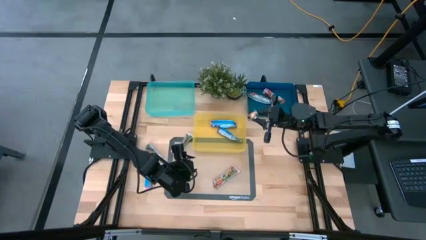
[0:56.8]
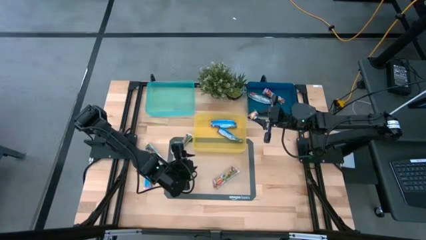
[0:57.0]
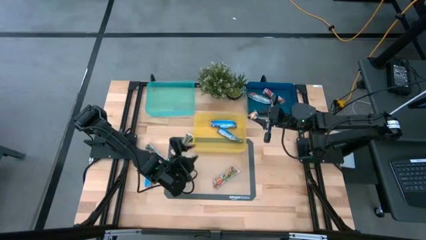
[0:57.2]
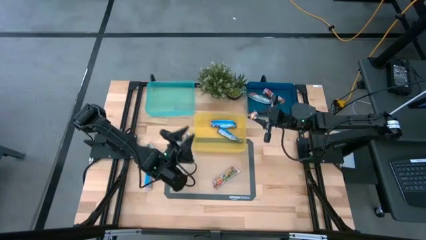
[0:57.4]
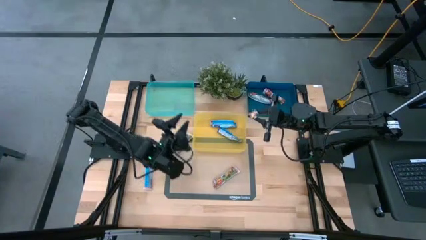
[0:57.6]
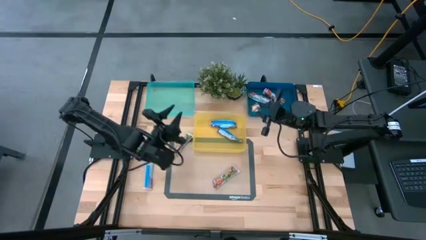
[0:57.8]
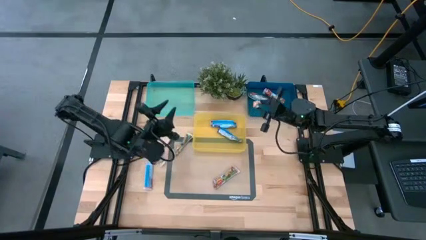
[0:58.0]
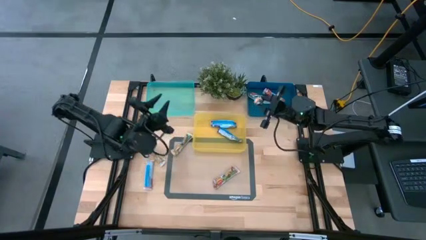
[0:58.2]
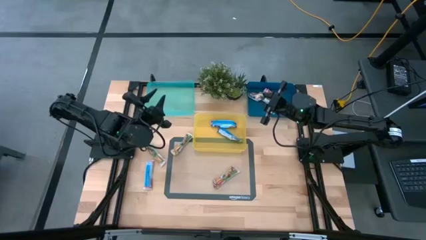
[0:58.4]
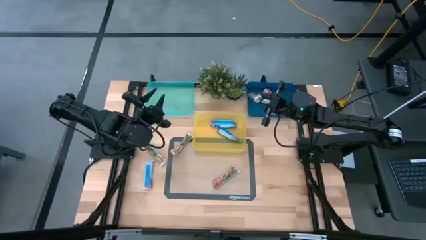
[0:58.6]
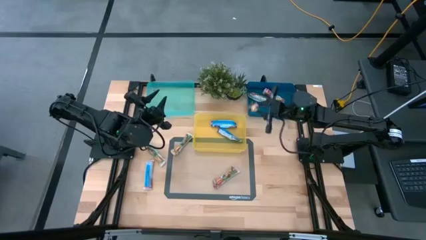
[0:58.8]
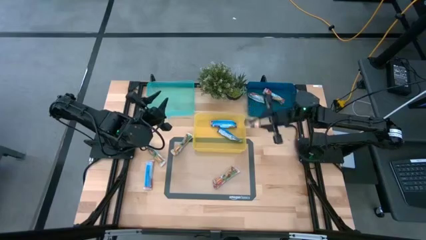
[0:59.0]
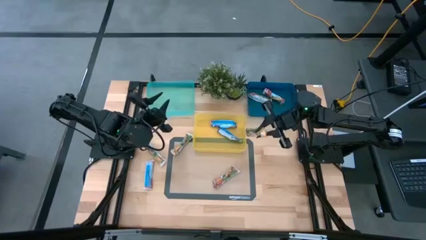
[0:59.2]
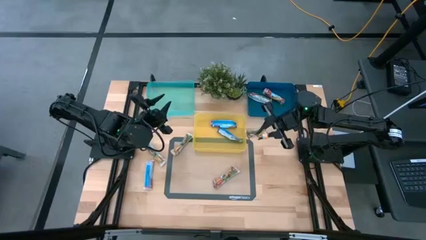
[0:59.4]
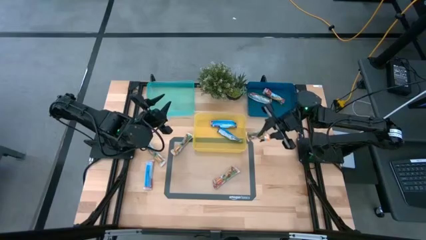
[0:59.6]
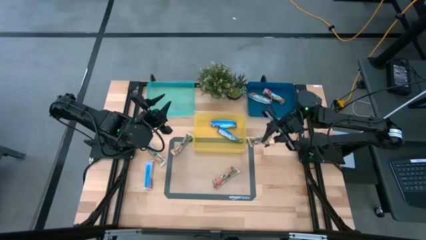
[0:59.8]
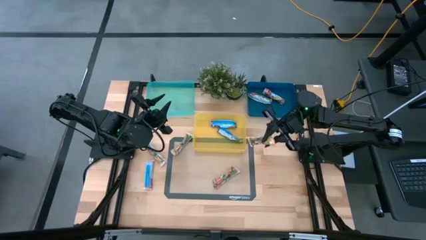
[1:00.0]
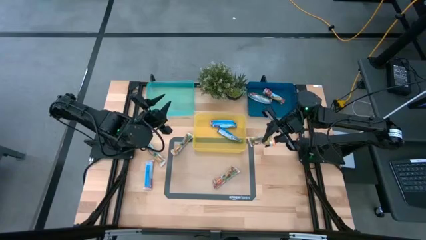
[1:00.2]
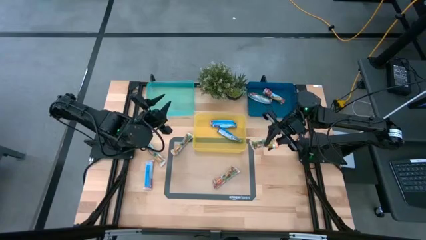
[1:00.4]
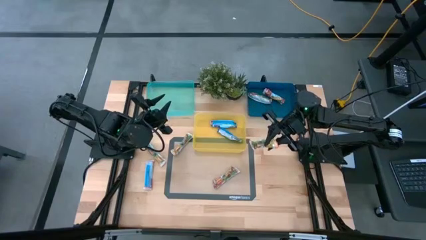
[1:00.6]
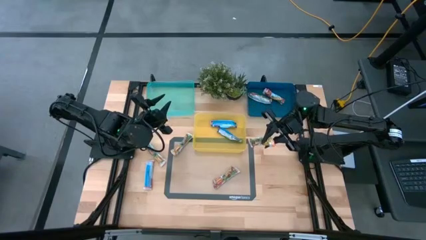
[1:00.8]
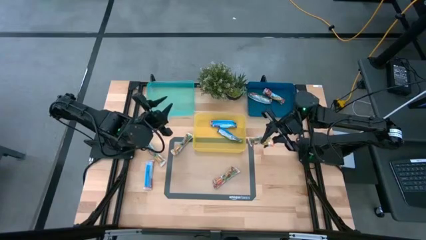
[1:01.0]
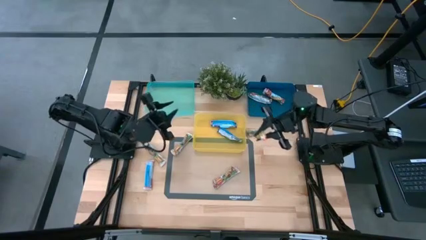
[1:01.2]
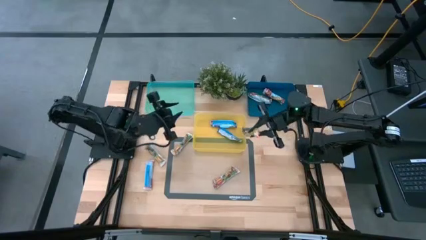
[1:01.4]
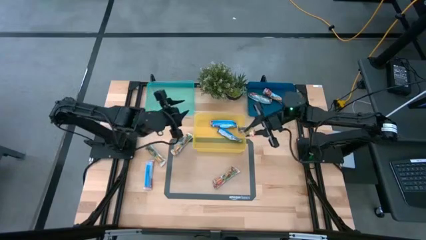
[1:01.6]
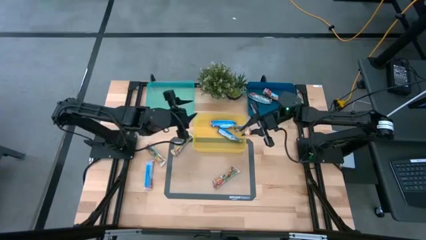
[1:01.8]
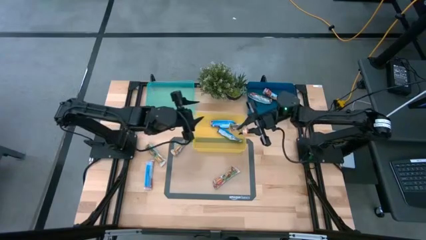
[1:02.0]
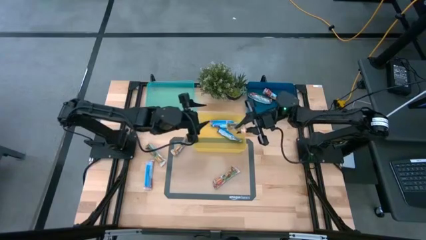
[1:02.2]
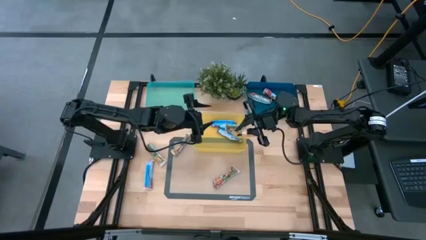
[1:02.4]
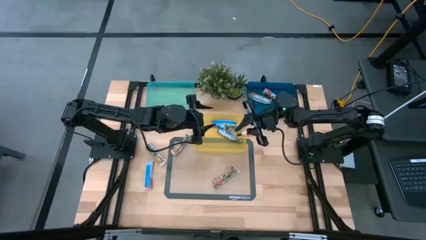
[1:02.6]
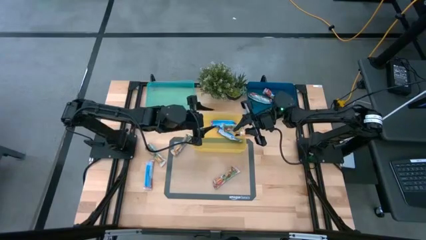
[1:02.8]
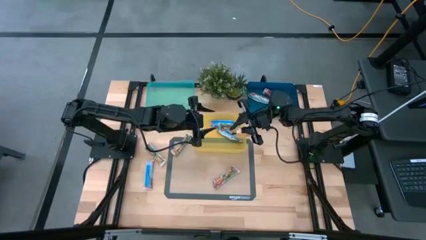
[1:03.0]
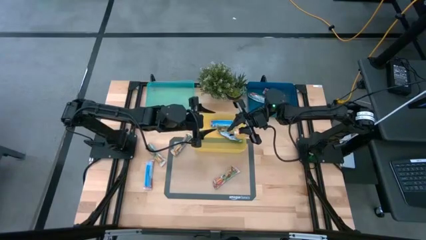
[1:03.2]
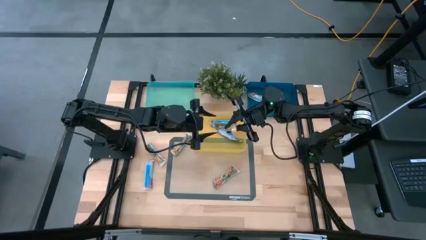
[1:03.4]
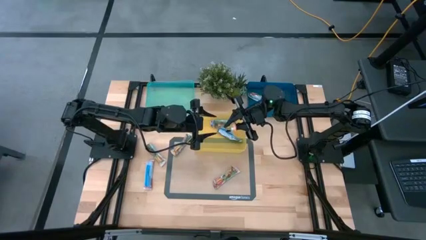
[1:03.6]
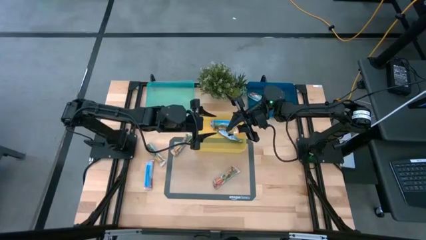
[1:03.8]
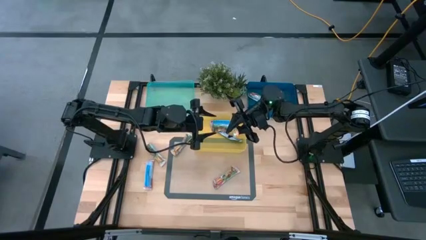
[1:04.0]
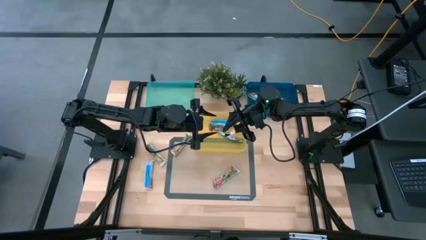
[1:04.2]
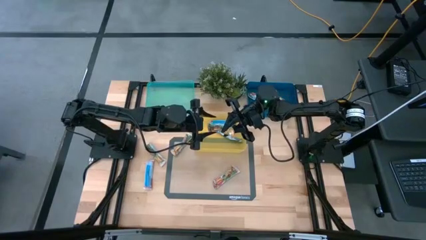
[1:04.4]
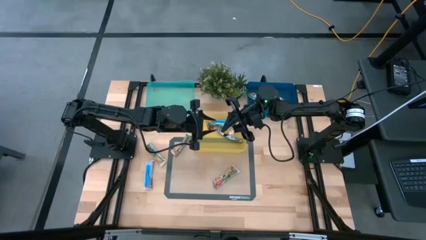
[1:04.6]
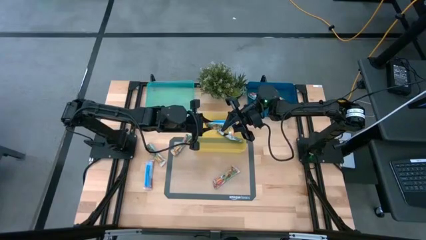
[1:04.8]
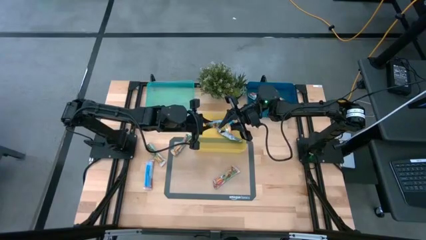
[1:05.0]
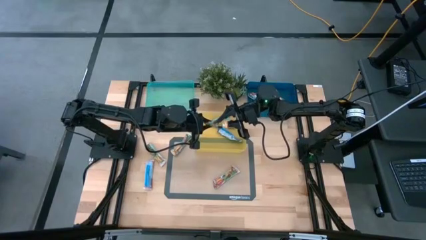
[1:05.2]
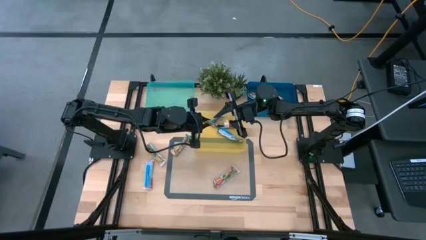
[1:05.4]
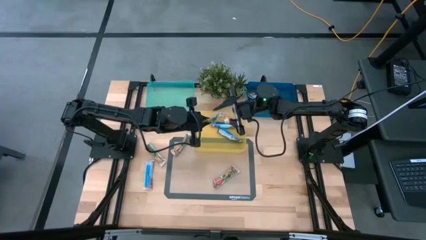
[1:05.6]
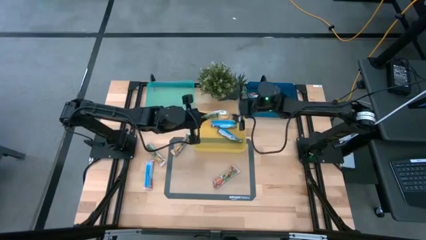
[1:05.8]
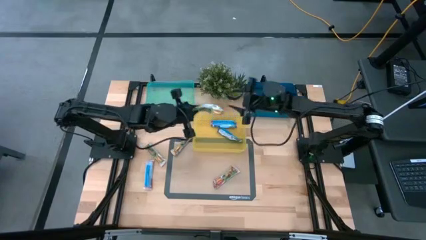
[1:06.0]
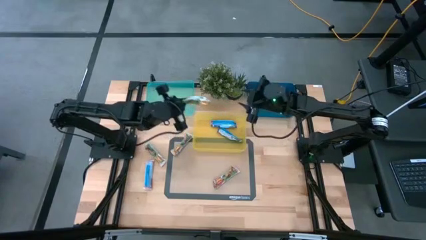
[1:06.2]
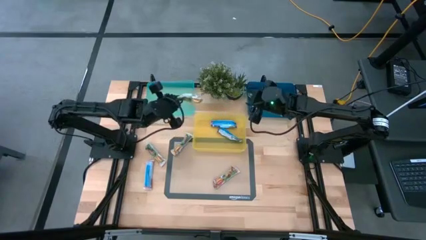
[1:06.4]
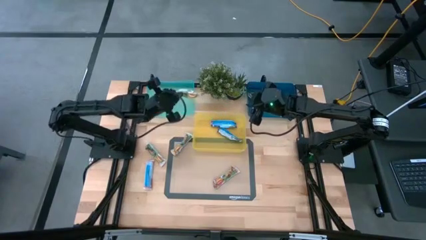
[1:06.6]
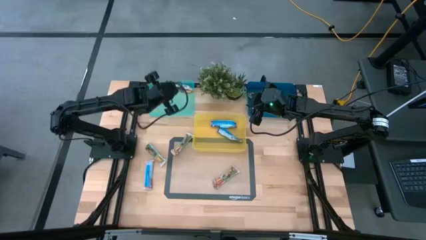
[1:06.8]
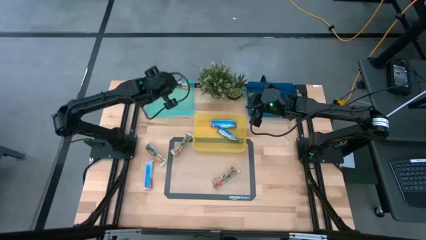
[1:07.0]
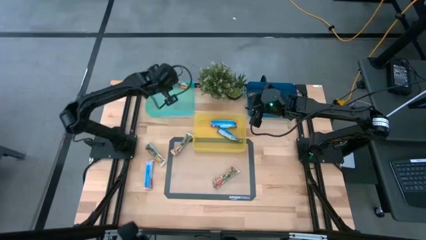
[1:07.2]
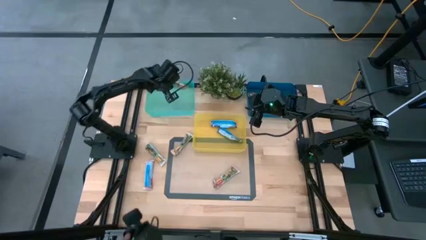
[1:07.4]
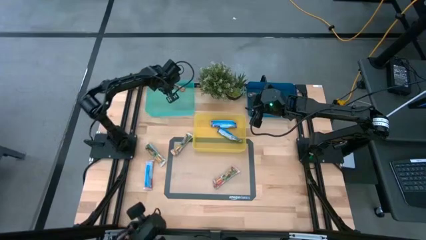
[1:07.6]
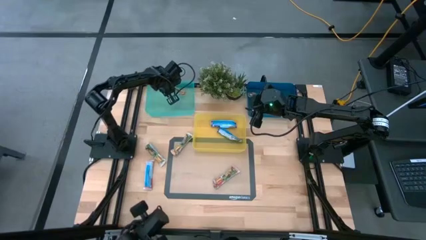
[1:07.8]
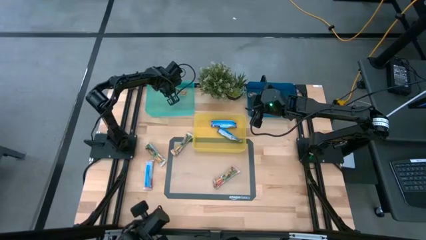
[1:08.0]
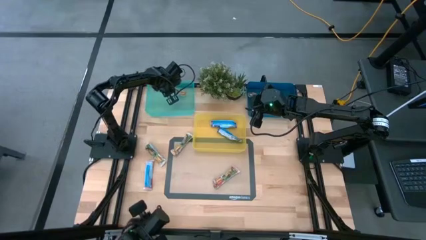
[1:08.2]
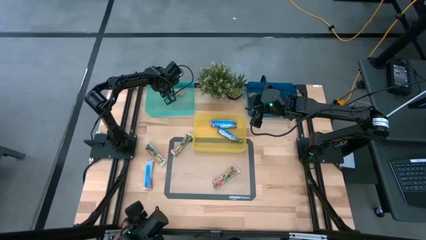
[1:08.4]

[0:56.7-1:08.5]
Task: Pick and place Granola Bars by type
Put the orange granola bar into the green bin

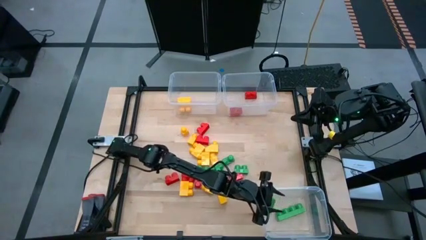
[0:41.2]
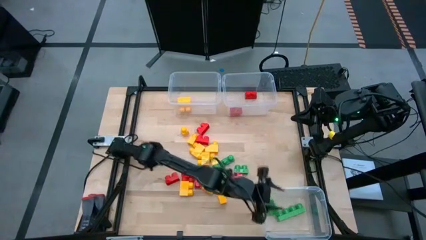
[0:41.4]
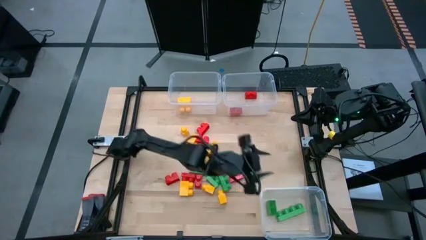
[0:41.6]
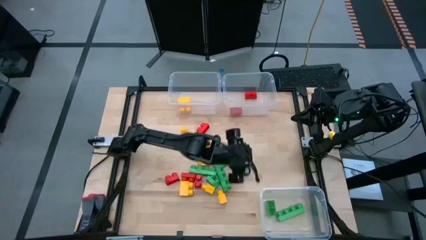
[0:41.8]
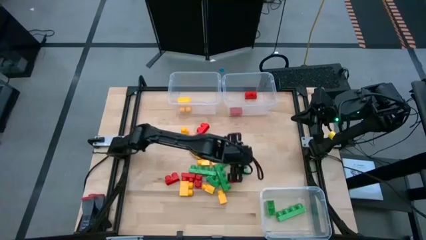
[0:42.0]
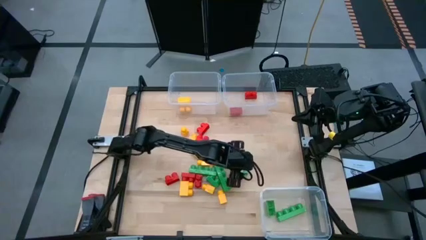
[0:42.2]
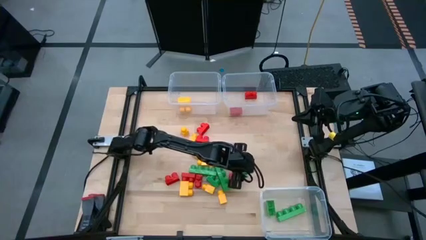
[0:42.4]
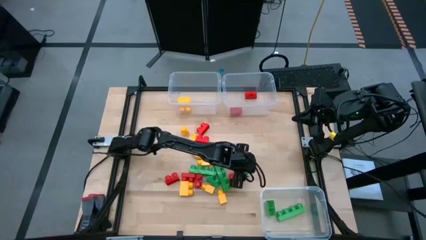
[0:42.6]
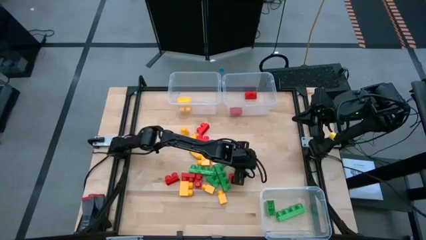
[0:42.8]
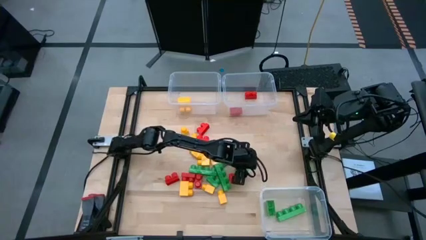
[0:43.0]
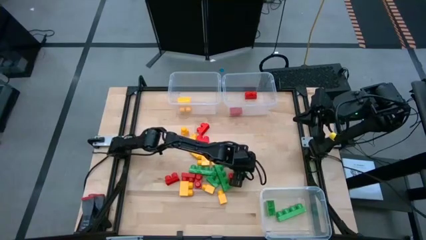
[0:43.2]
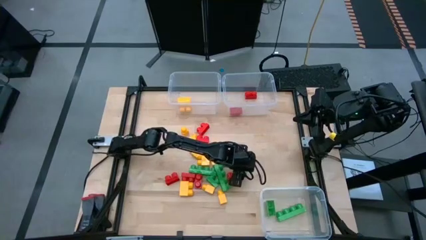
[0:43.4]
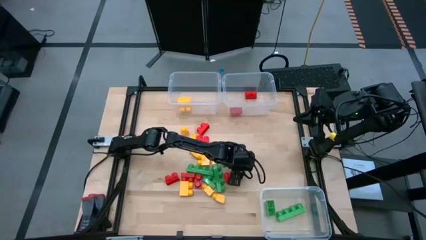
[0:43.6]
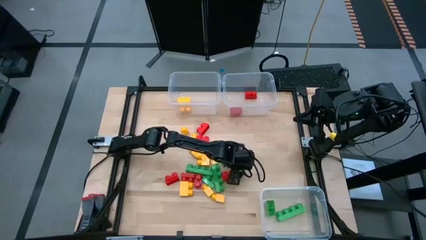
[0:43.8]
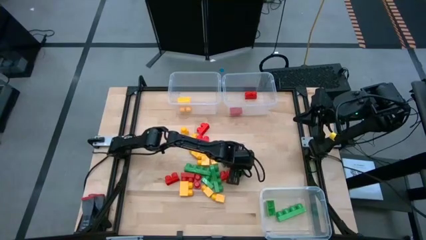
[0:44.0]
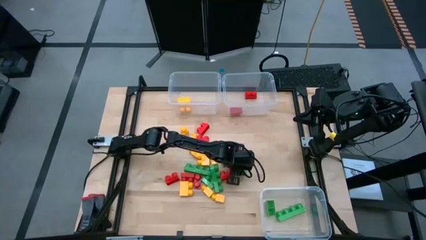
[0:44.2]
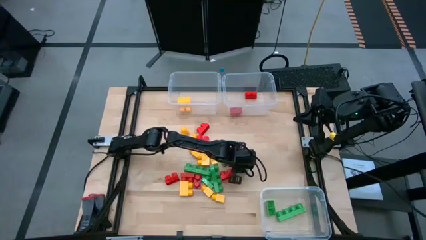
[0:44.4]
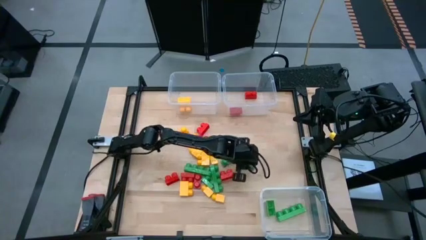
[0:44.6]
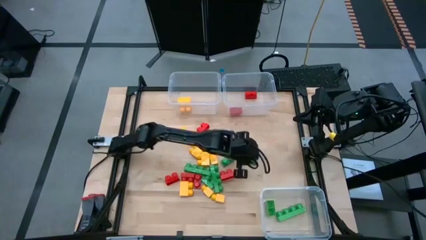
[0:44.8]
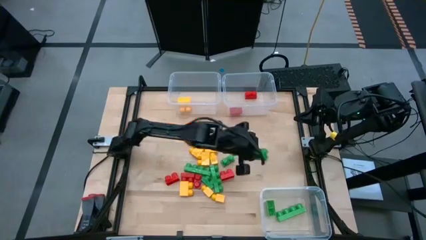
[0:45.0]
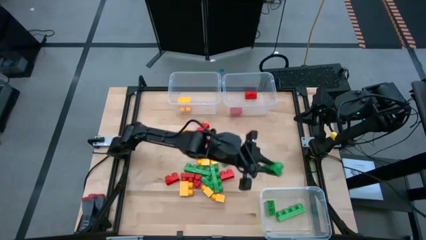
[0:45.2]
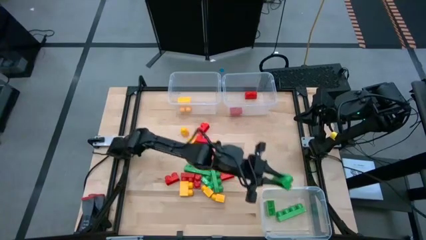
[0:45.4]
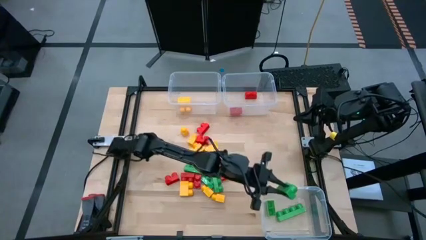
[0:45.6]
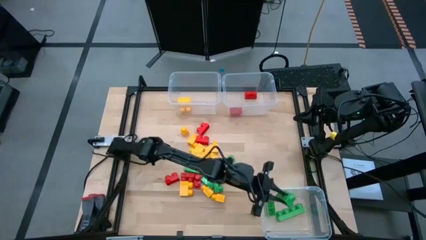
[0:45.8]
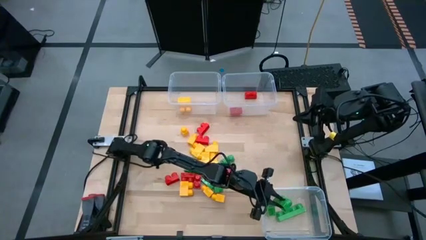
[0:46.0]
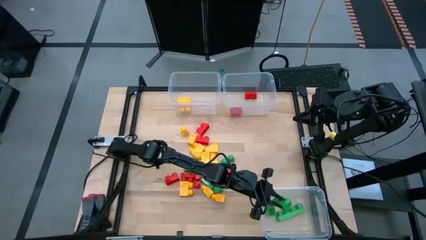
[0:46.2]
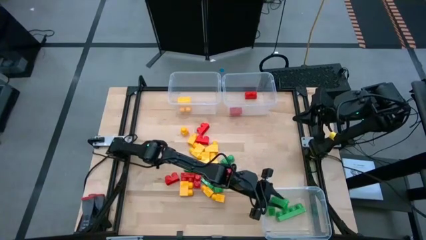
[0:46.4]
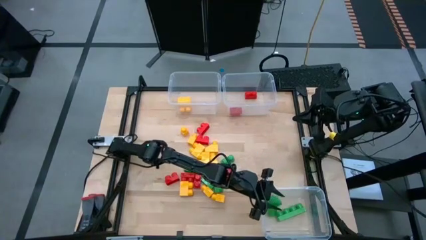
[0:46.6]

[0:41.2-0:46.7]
Task: Sort blocks
Put the green piece into the bottom right transparent bin
